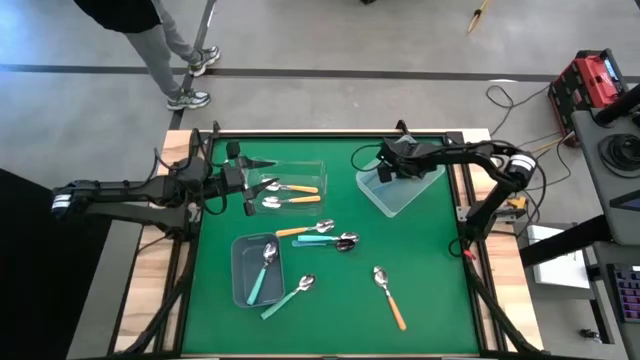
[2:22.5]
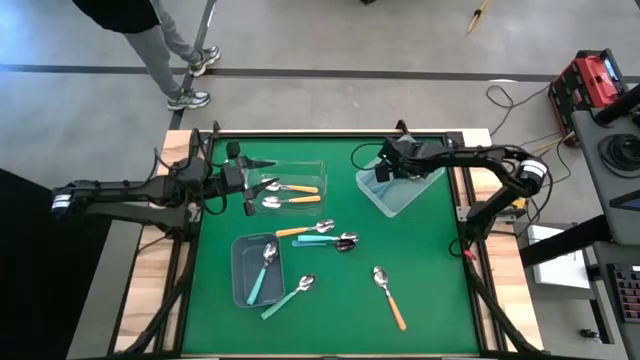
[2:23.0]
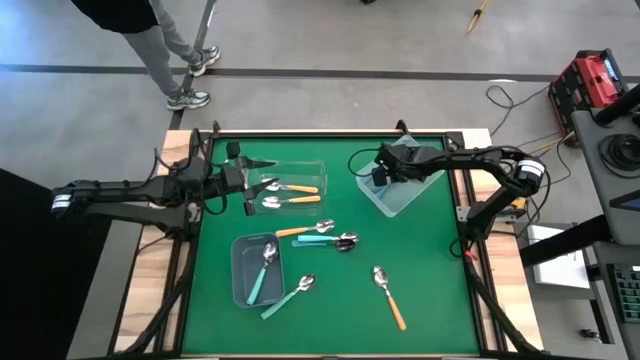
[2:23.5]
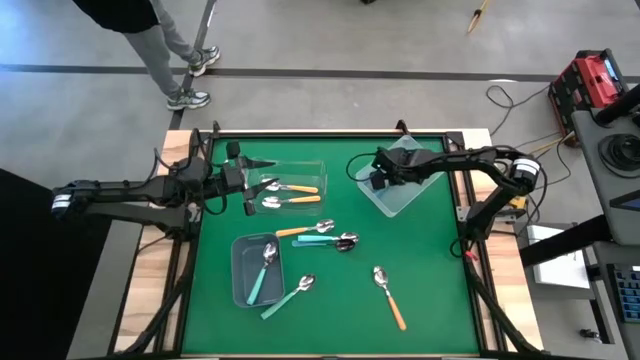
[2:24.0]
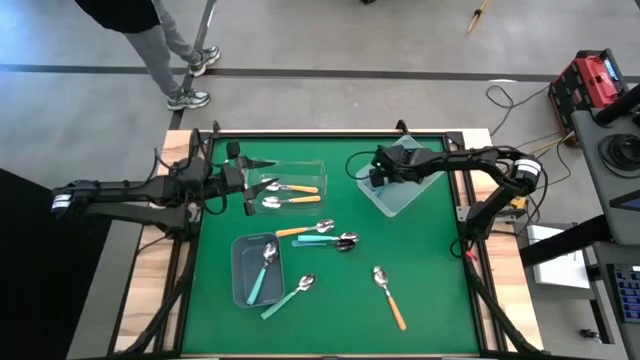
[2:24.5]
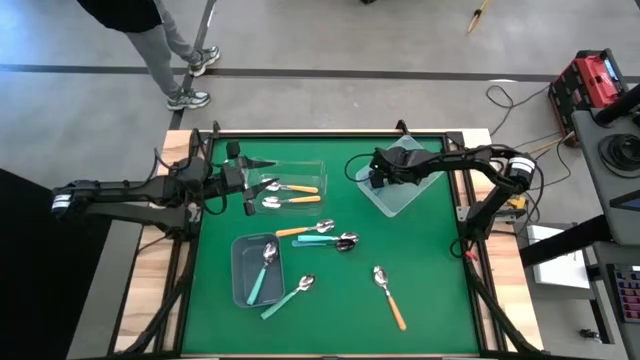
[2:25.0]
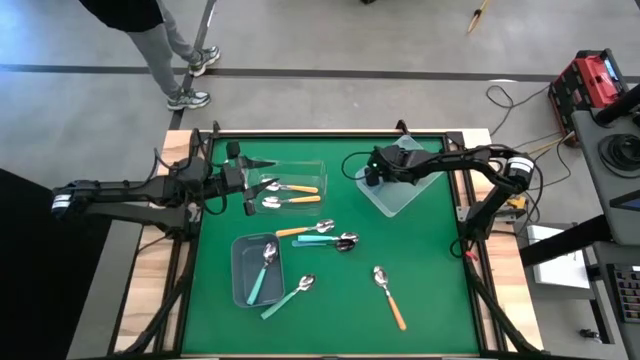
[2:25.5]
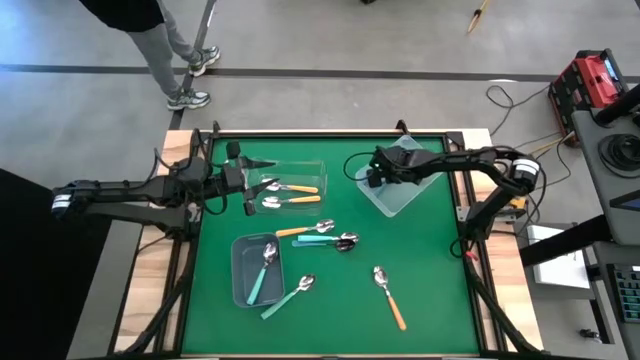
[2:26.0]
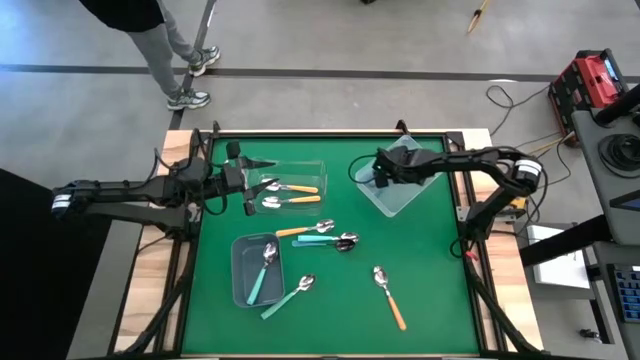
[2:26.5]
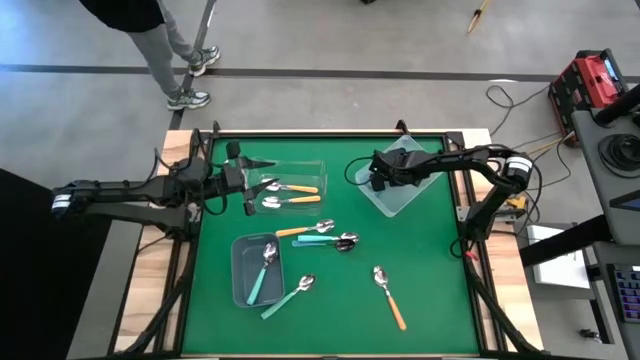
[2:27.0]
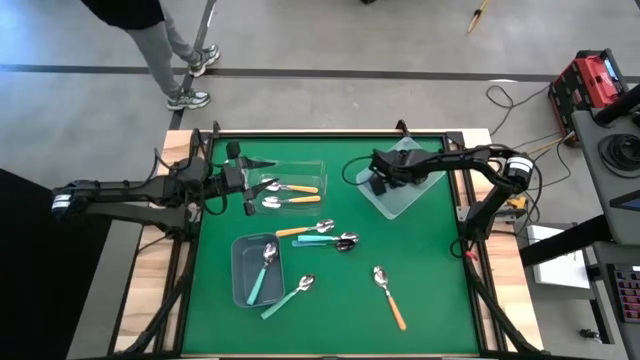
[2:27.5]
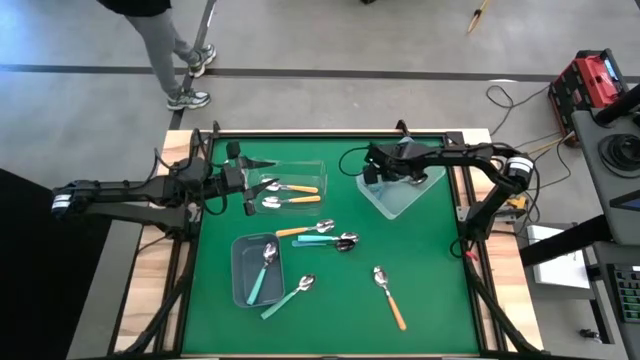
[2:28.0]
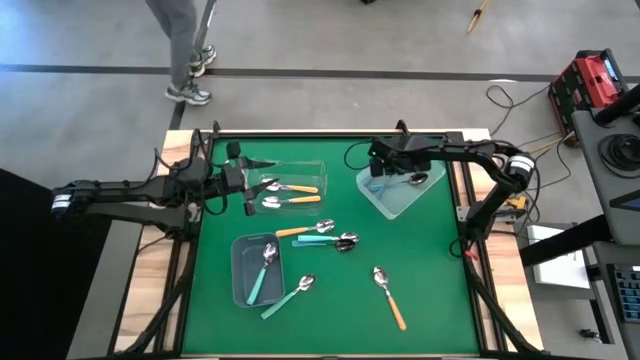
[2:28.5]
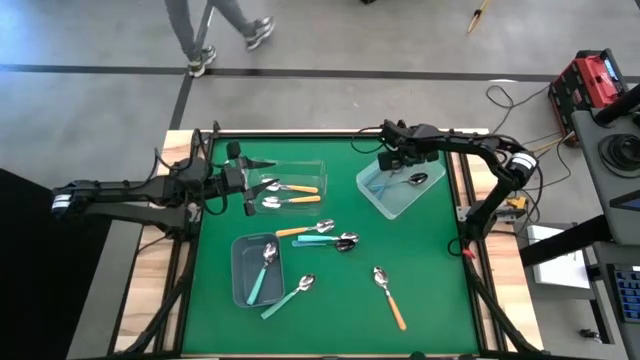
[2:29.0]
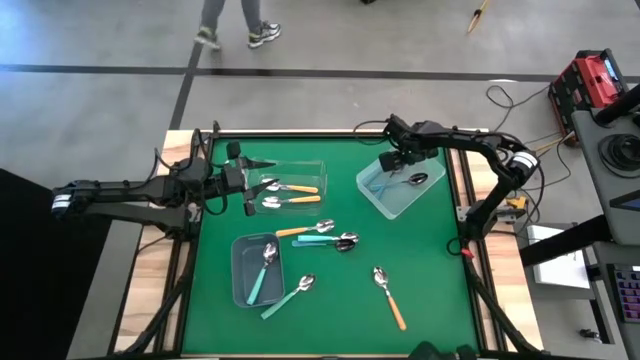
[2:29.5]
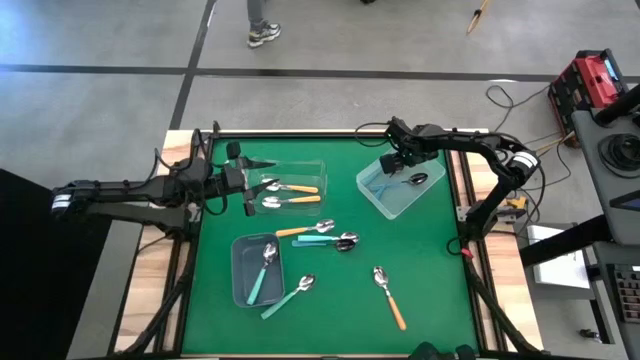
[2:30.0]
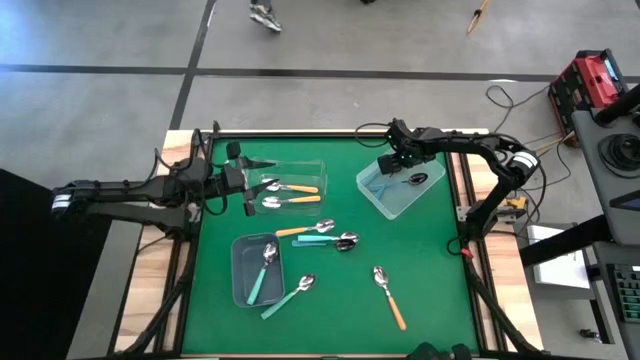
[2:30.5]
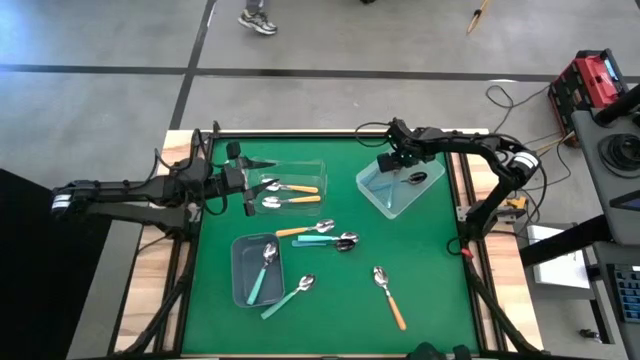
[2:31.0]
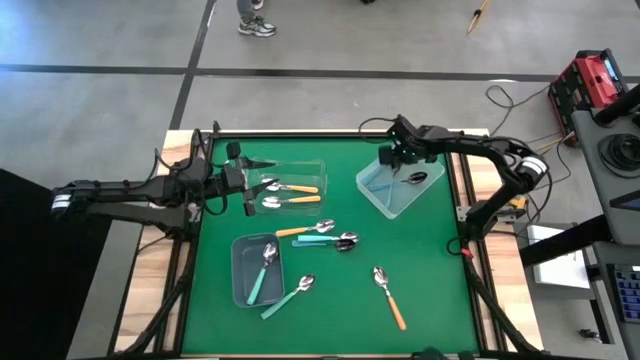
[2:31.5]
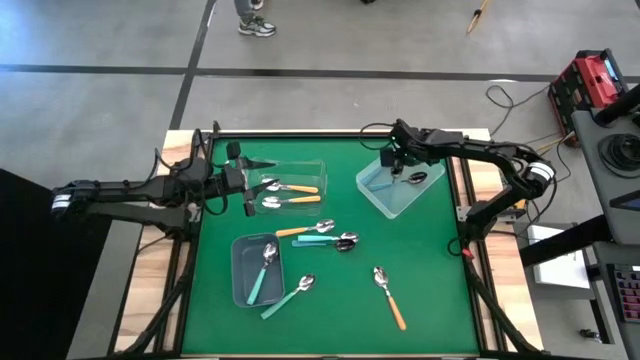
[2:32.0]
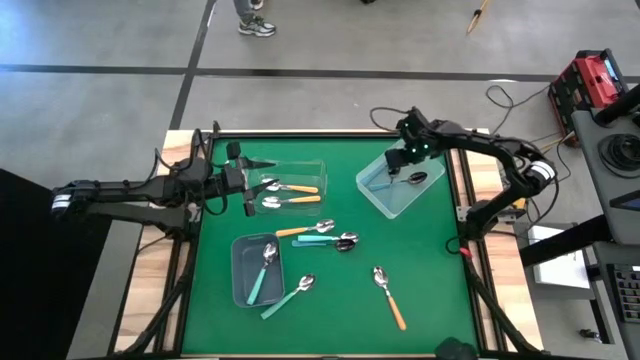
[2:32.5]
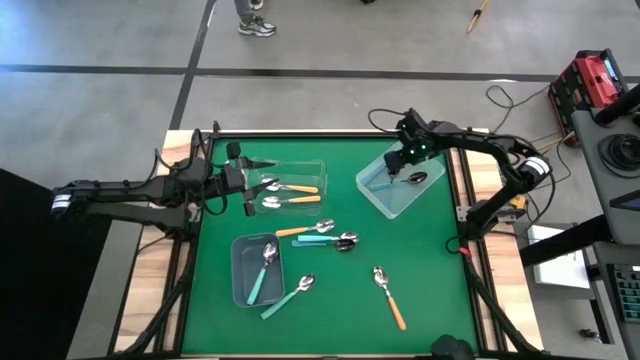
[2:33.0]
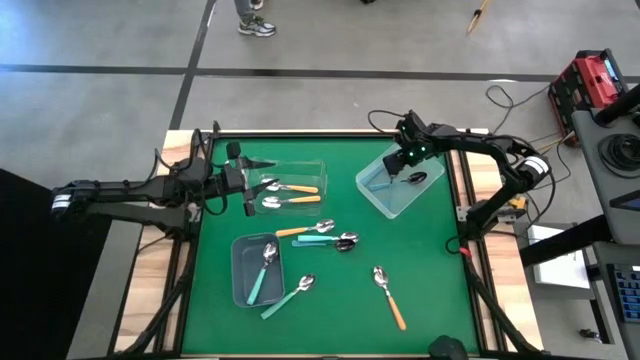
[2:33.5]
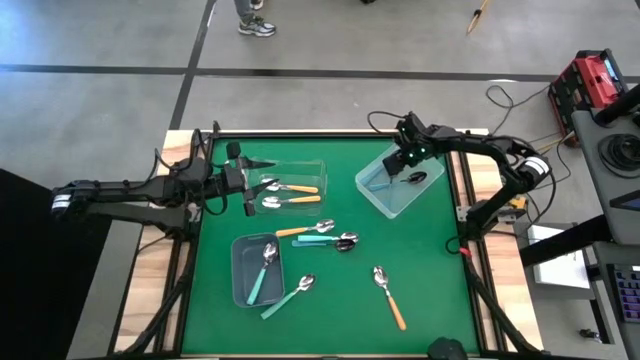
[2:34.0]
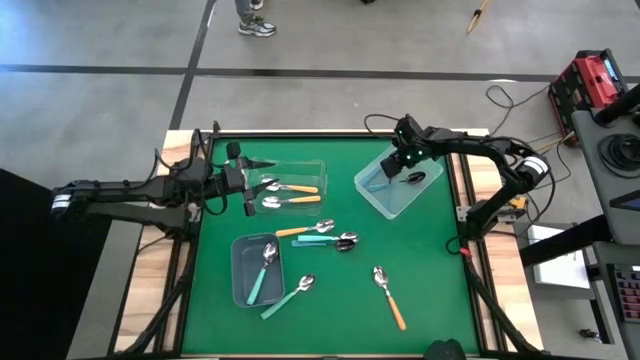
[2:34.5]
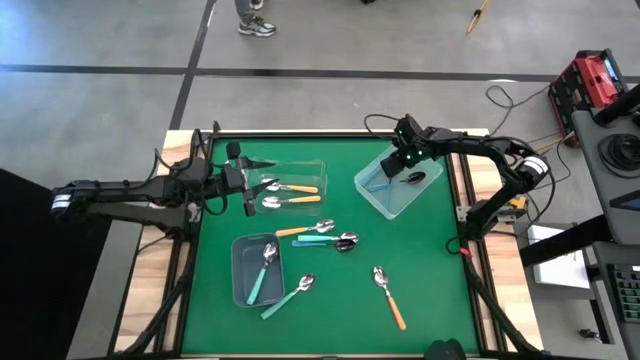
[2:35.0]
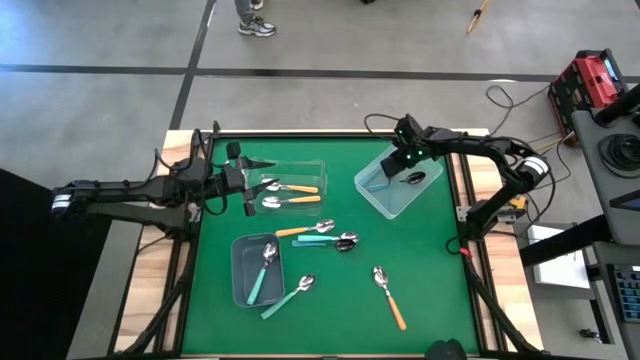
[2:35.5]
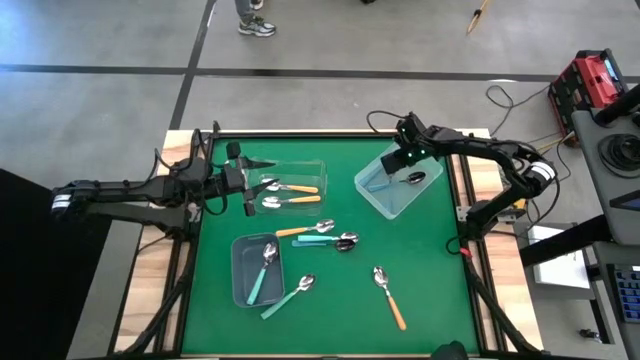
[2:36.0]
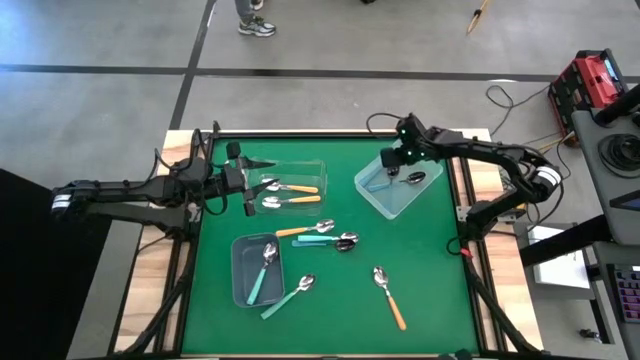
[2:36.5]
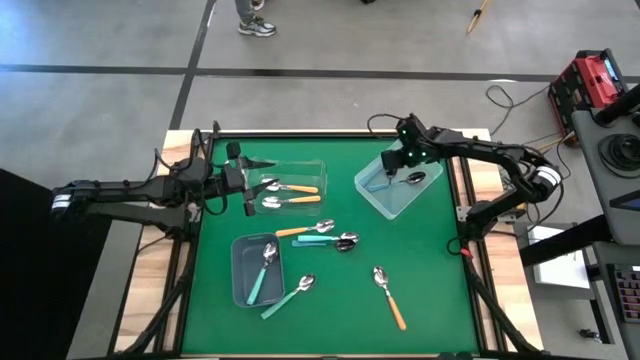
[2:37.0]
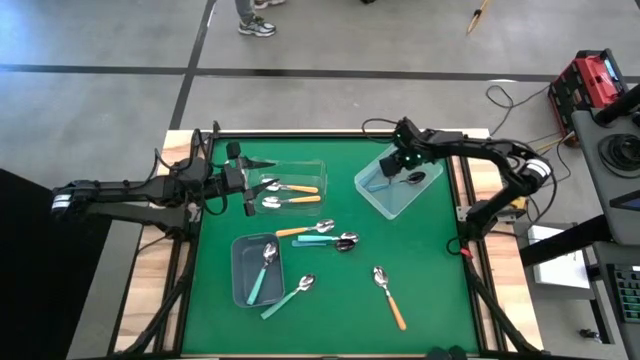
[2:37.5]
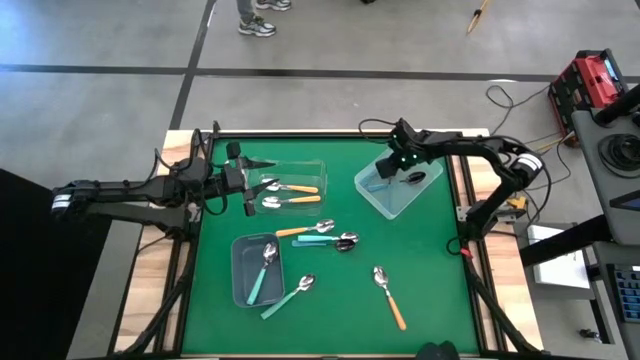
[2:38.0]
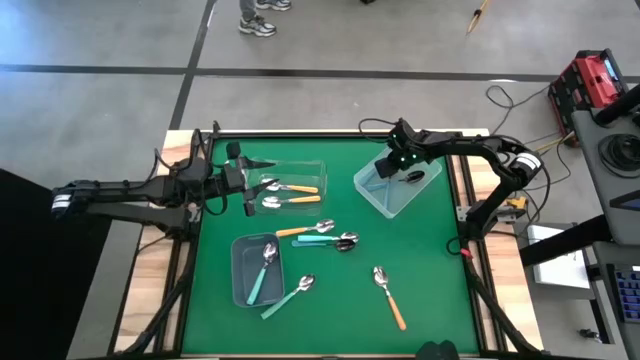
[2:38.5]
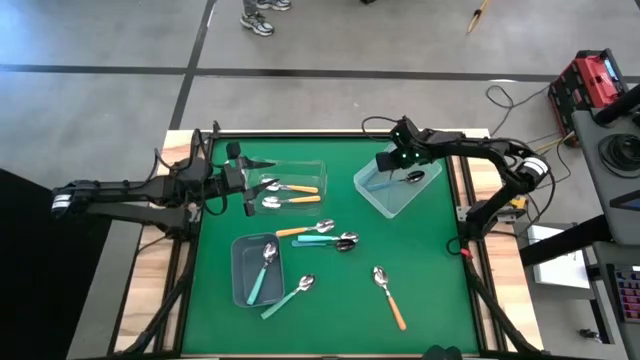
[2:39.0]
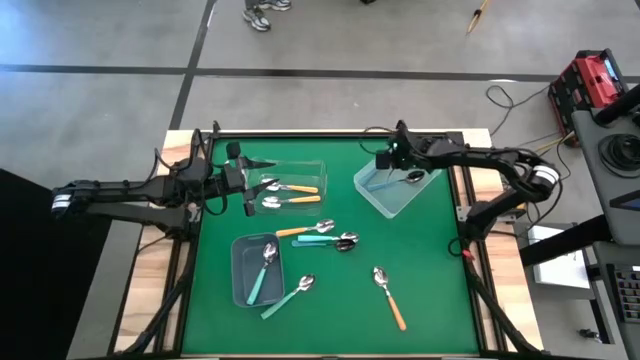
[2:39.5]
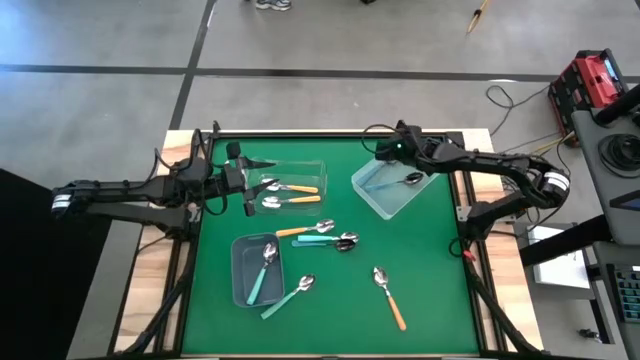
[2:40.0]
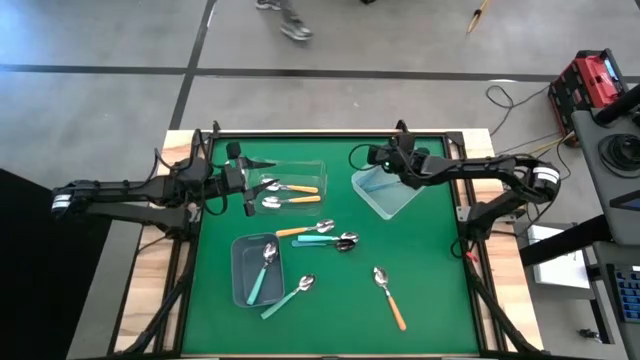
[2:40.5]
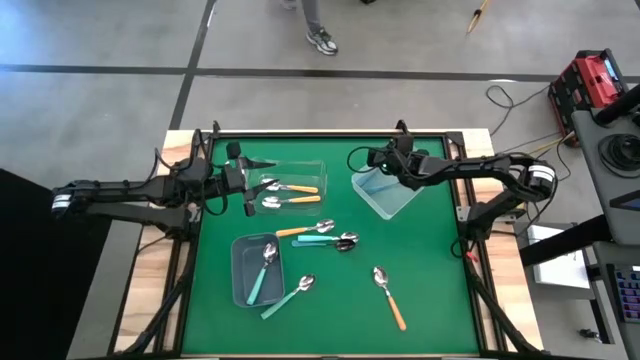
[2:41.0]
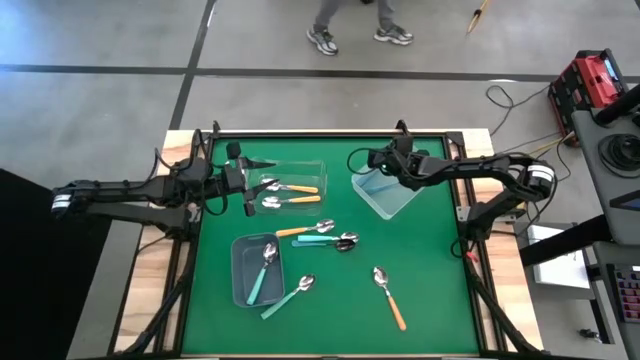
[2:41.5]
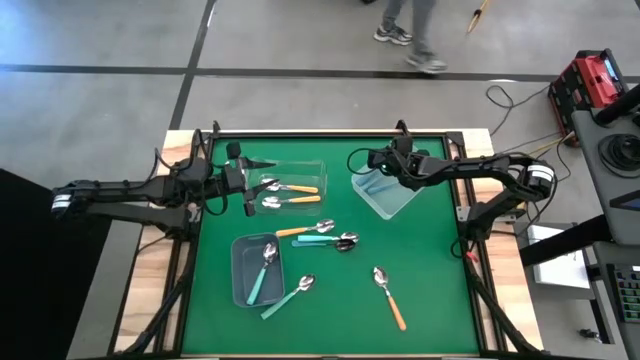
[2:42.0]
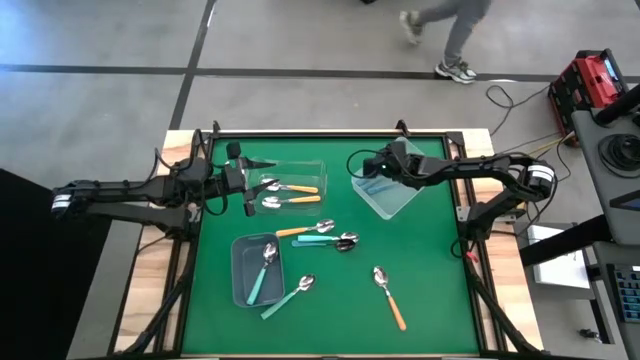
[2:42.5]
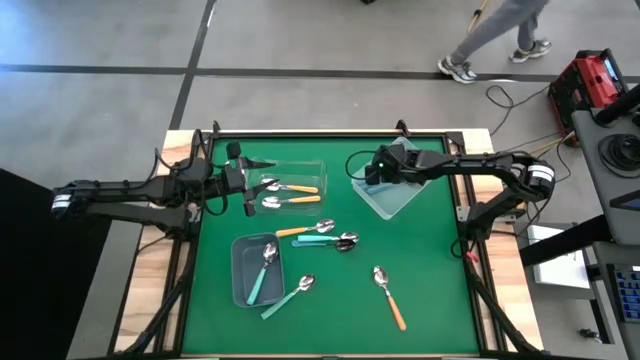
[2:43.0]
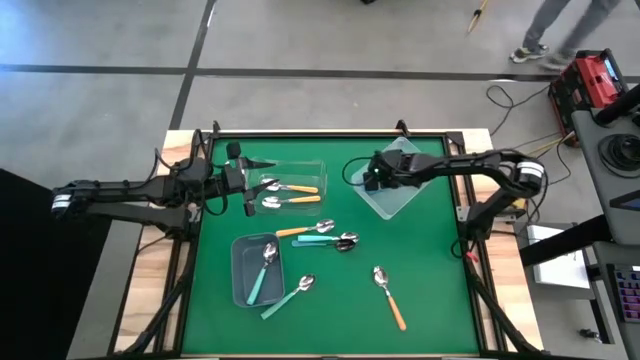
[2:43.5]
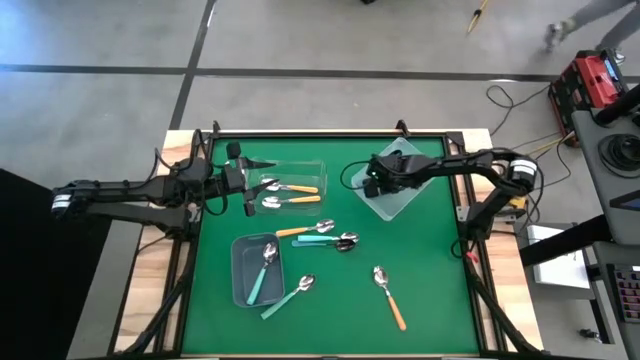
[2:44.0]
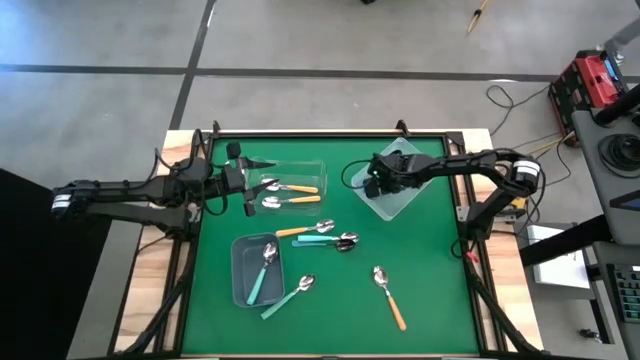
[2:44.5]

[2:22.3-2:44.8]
Task: Sort silverware by color (type)
Put the blue spoon into the white bin
